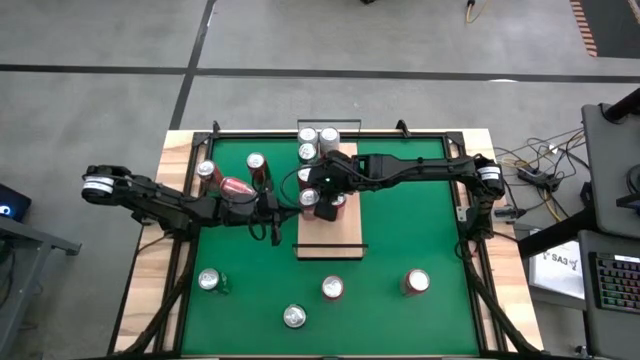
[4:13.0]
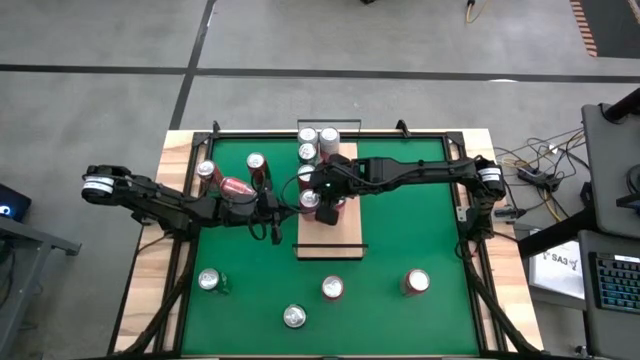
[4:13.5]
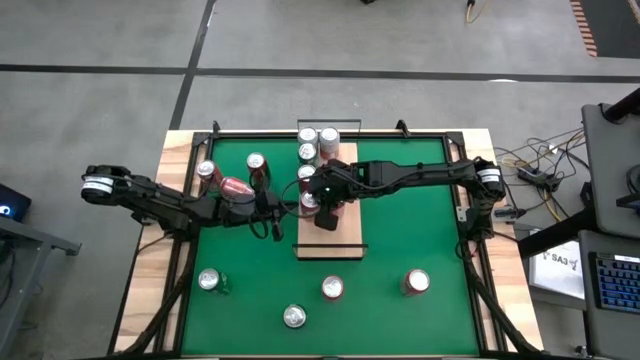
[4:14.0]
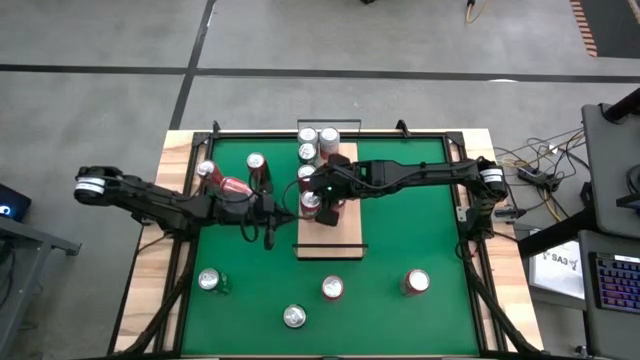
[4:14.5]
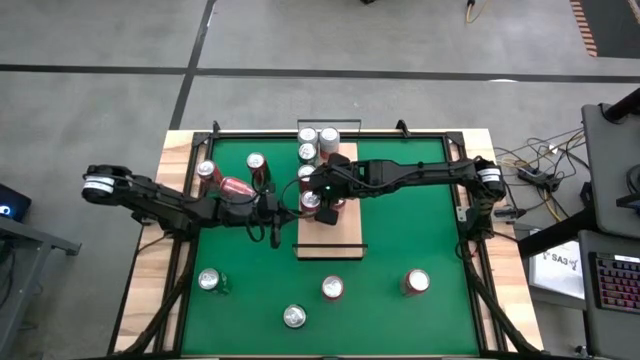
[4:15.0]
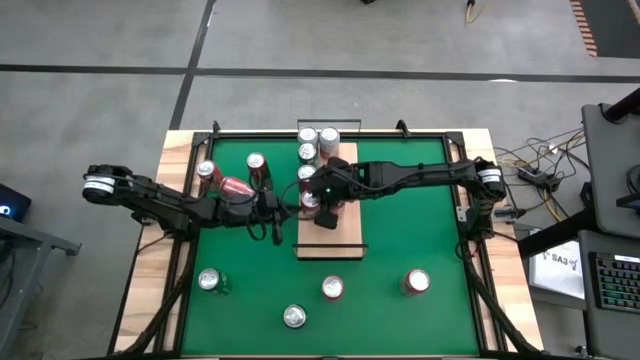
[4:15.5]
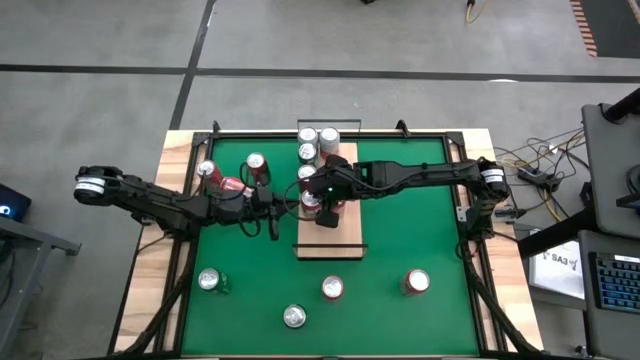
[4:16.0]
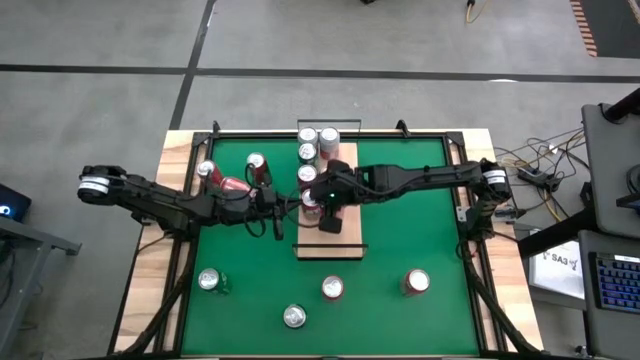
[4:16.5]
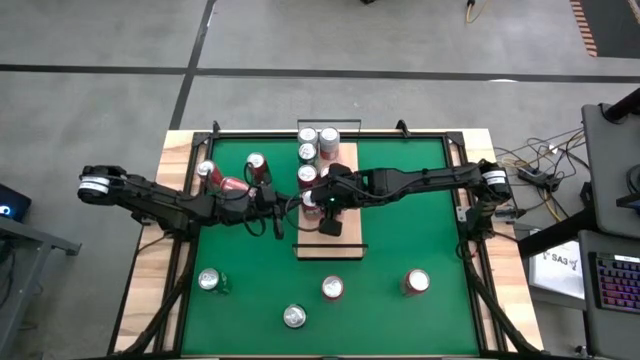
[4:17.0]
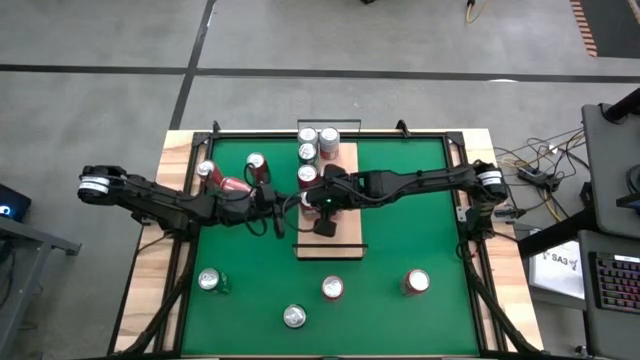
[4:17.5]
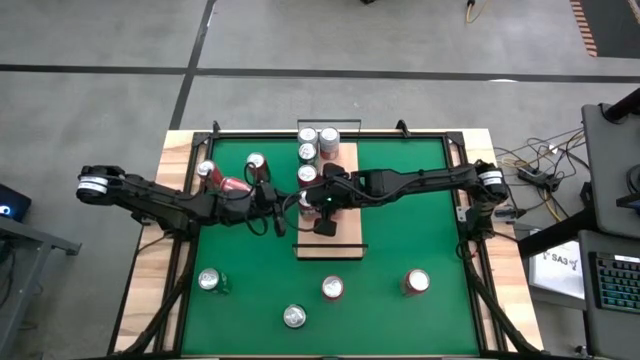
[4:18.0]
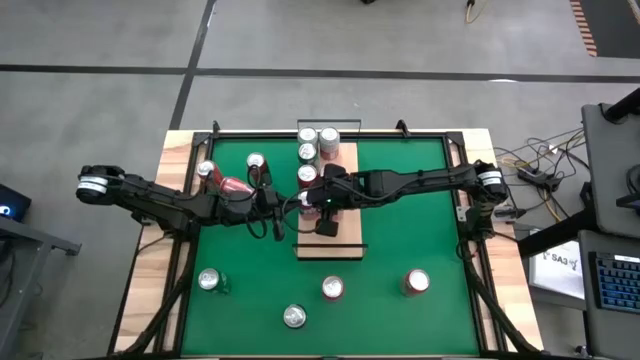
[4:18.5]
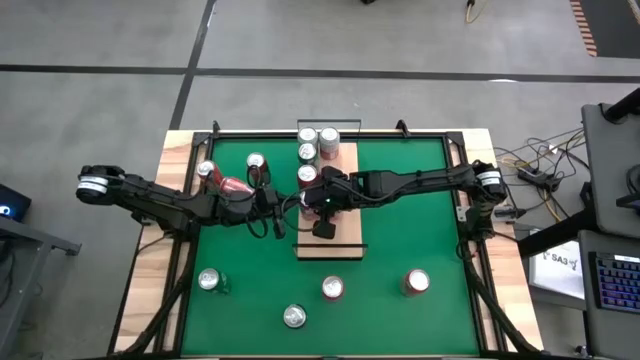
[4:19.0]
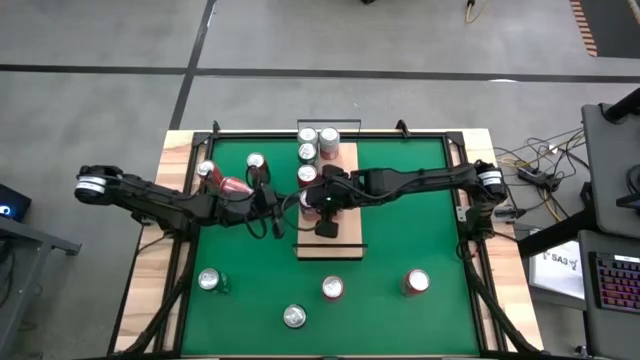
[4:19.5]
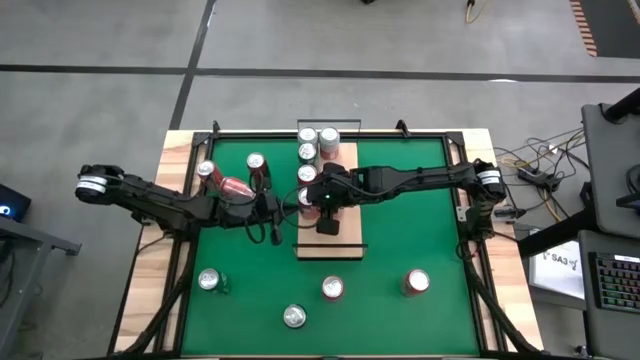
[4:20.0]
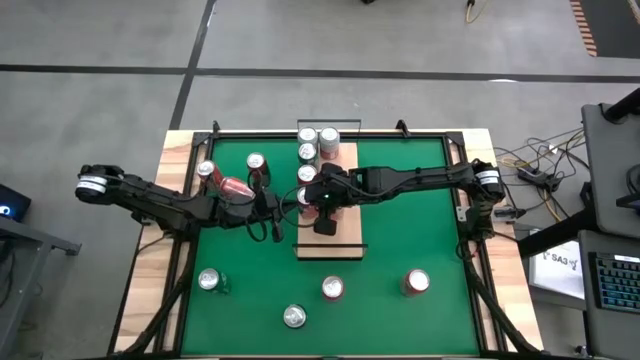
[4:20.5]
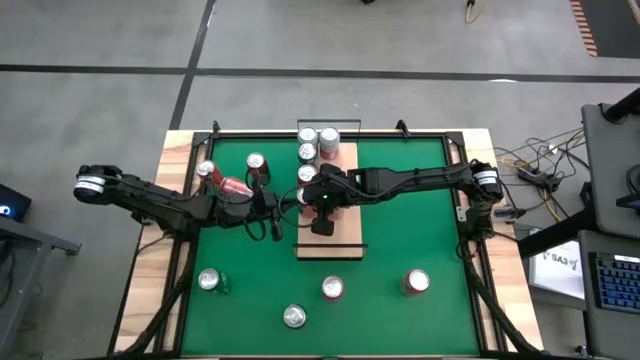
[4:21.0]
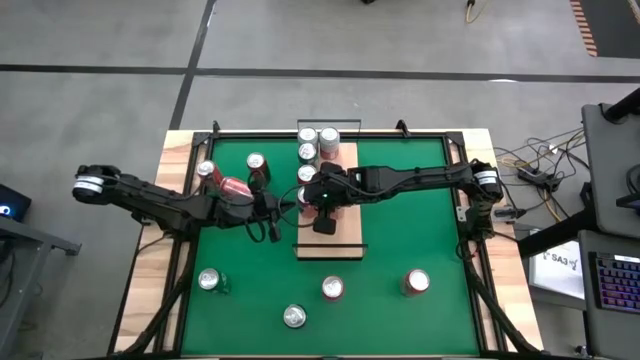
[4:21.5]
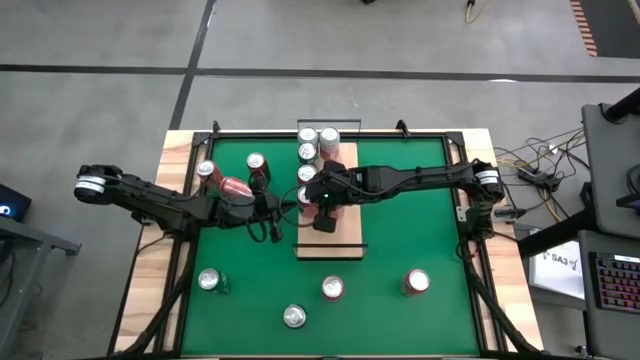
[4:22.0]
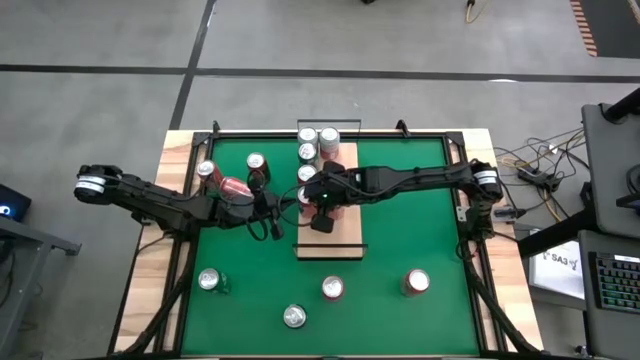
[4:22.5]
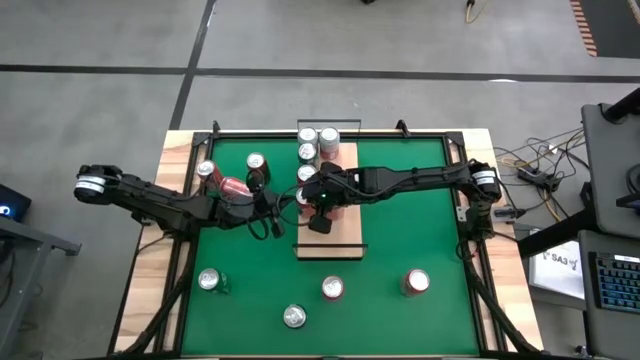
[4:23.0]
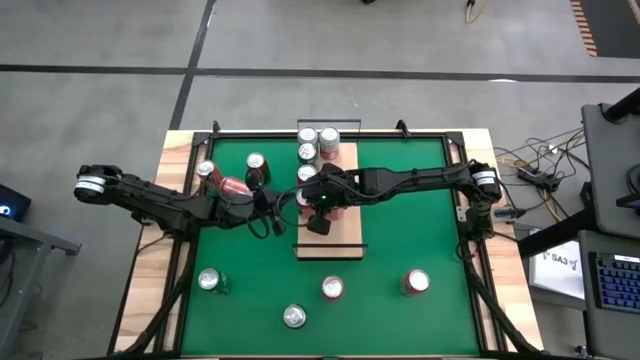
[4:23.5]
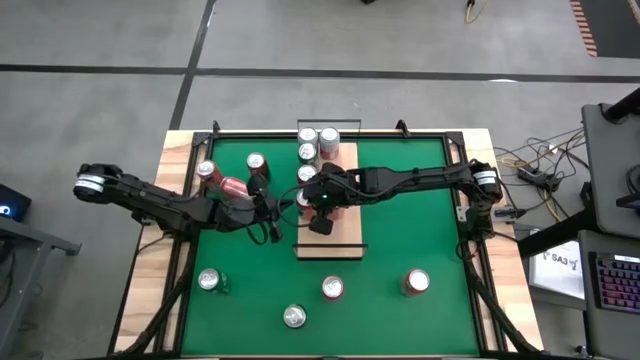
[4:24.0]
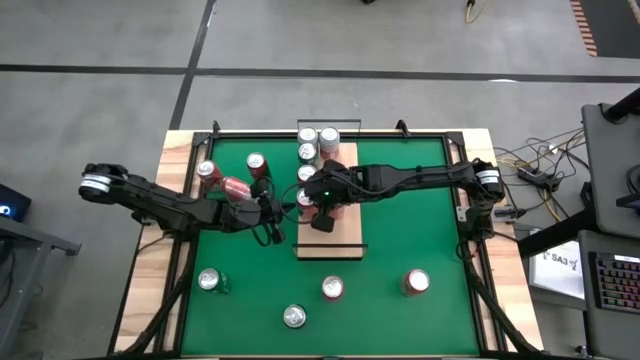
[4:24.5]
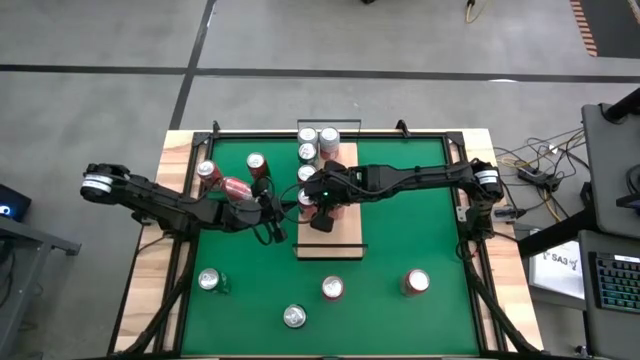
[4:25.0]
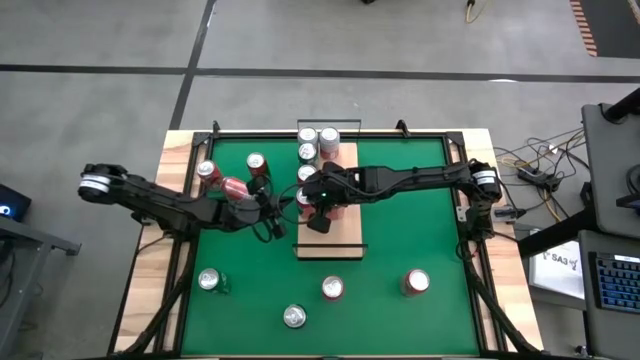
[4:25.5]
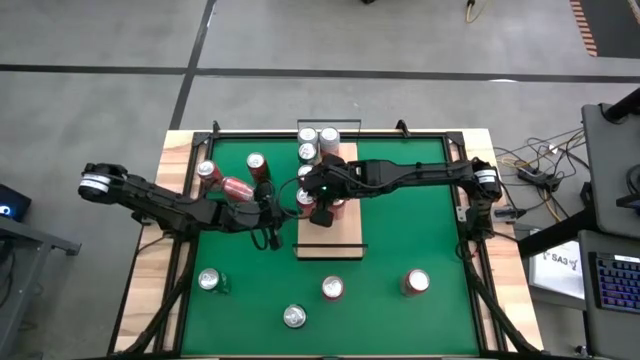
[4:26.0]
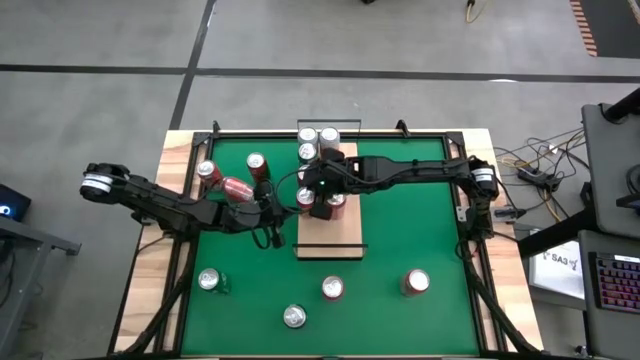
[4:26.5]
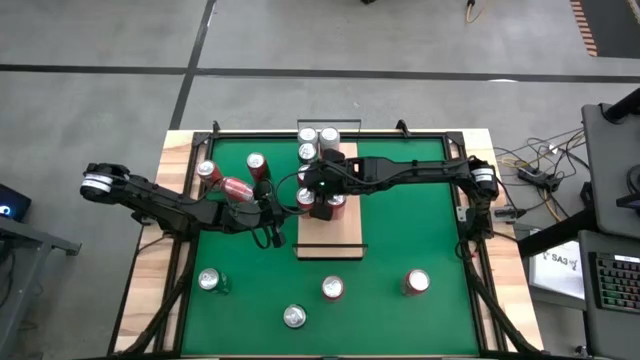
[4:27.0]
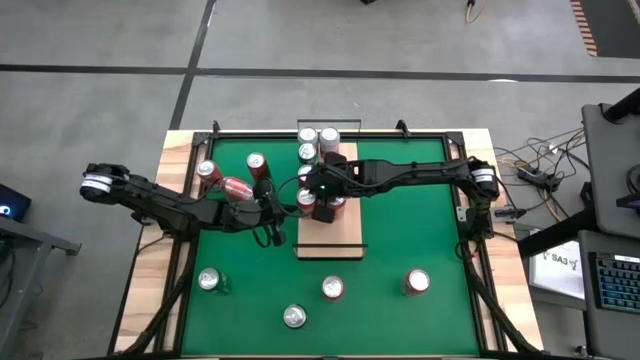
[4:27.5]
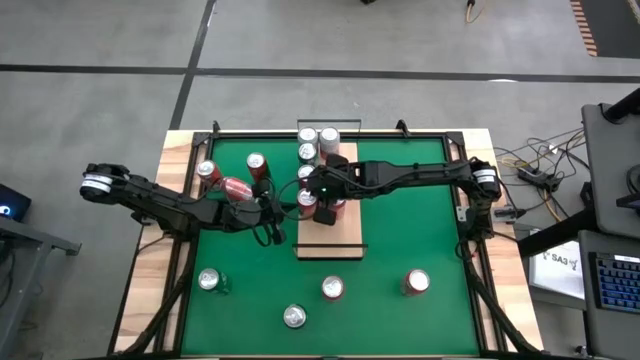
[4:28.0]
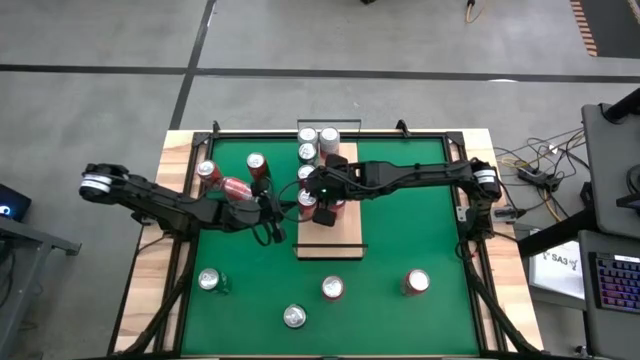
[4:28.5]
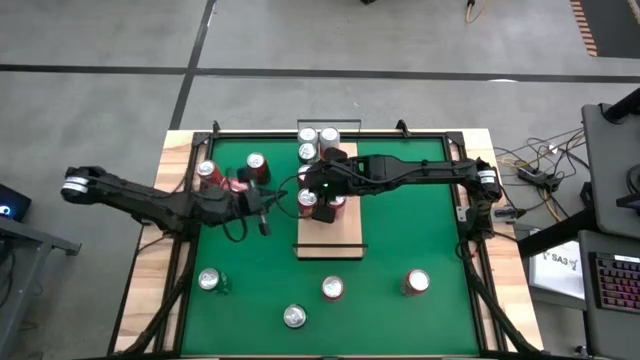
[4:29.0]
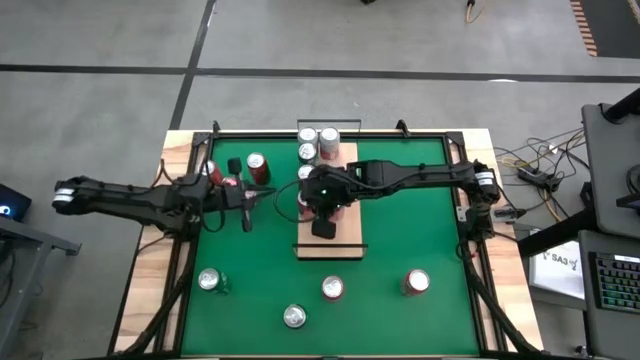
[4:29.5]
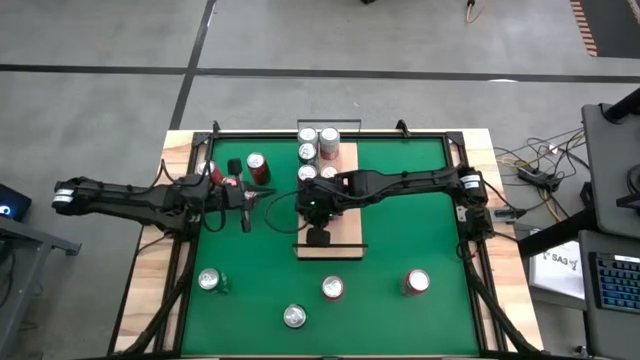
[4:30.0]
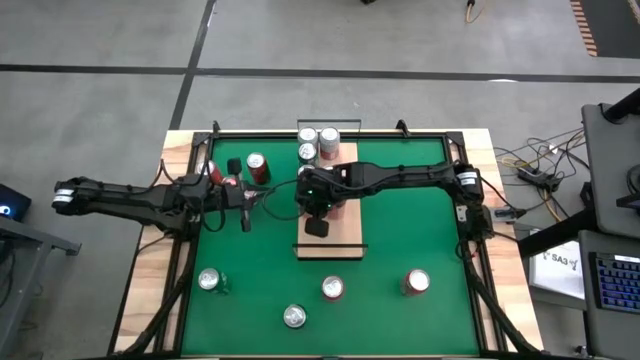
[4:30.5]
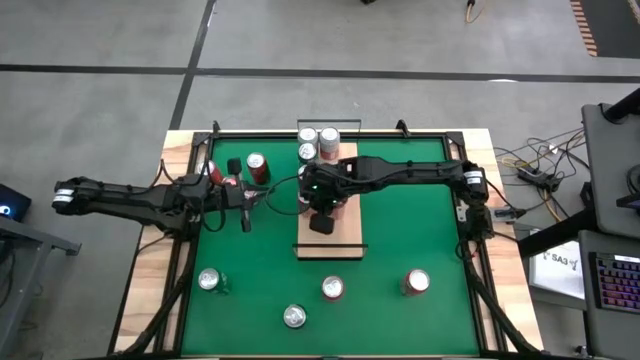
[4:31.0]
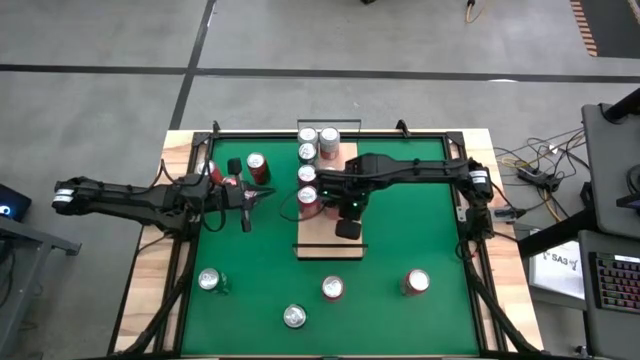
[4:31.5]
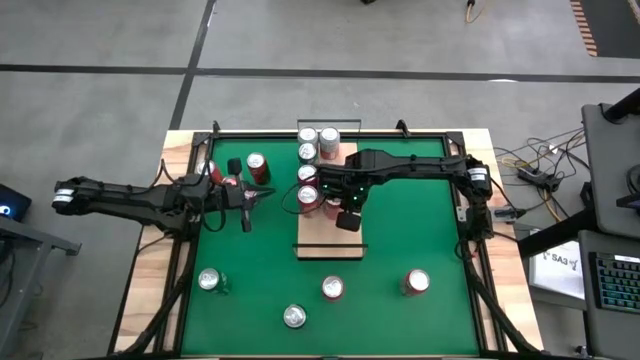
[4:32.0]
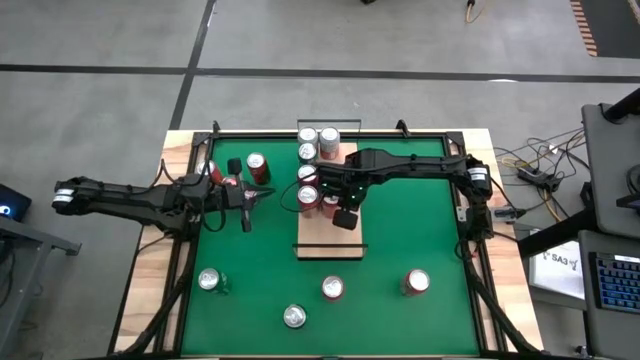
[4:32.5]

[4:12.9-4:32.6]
Task: Place canned beverage on shelf
Put the orange soda can on the shelf and aligned with the other orange soda can
